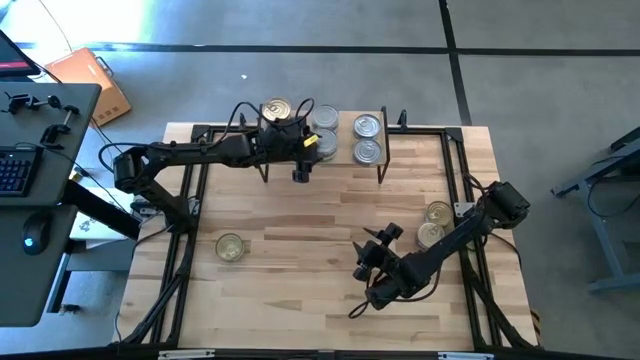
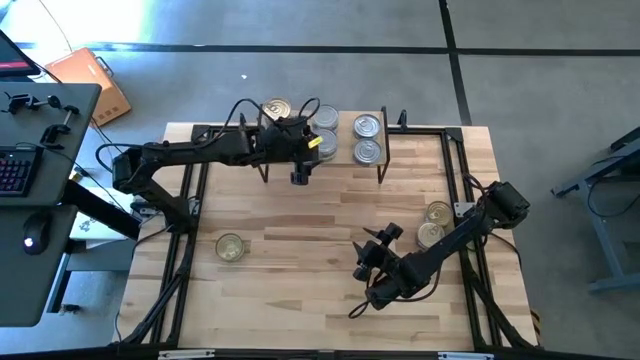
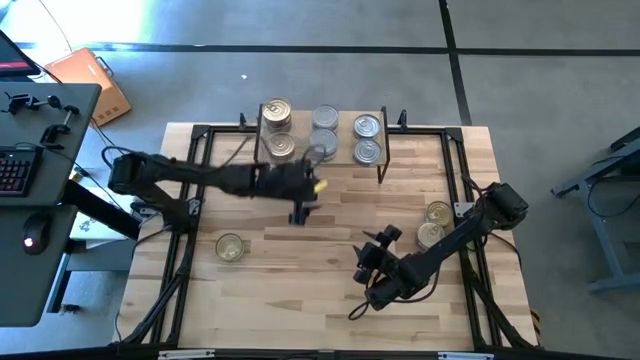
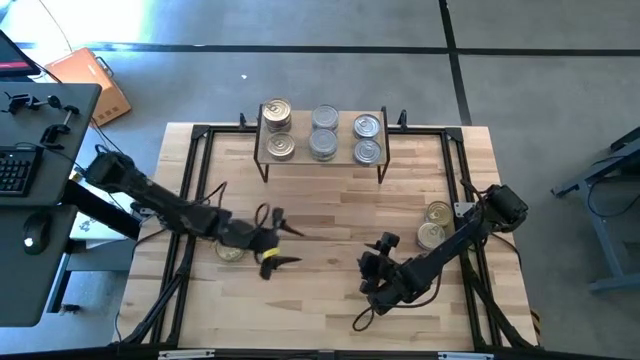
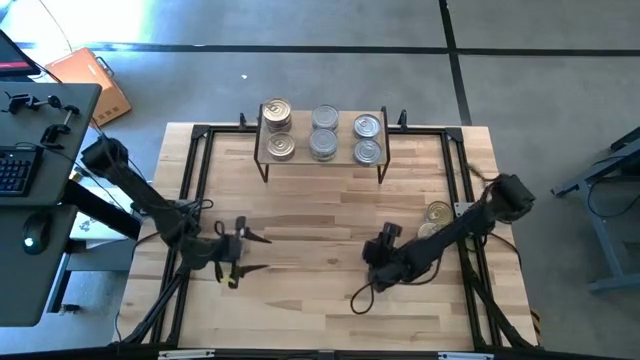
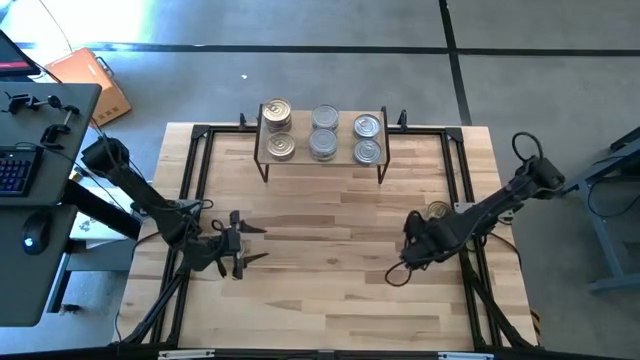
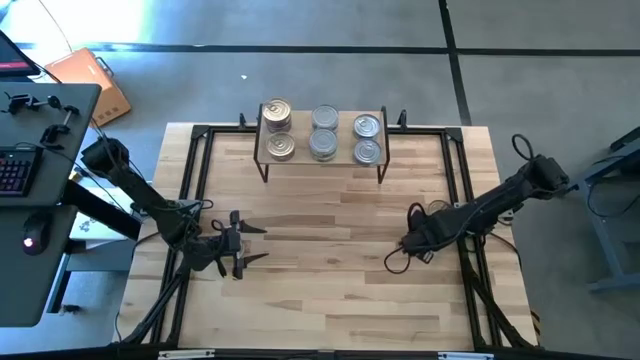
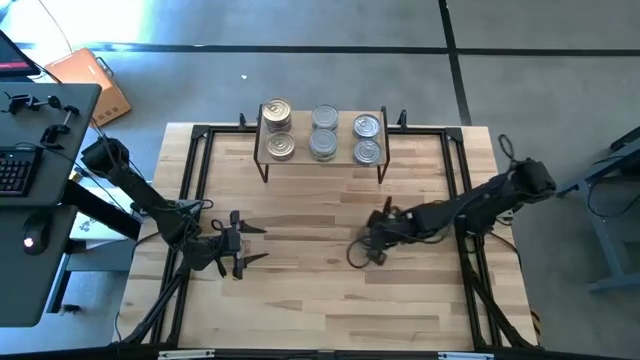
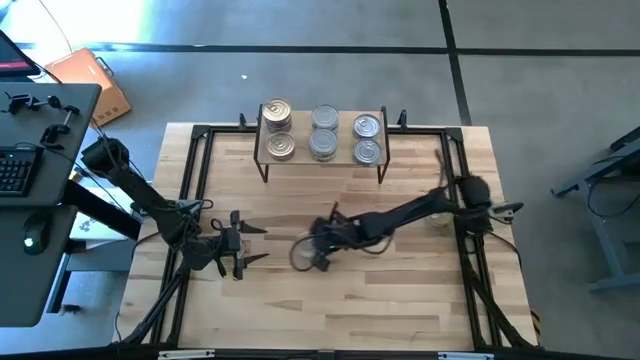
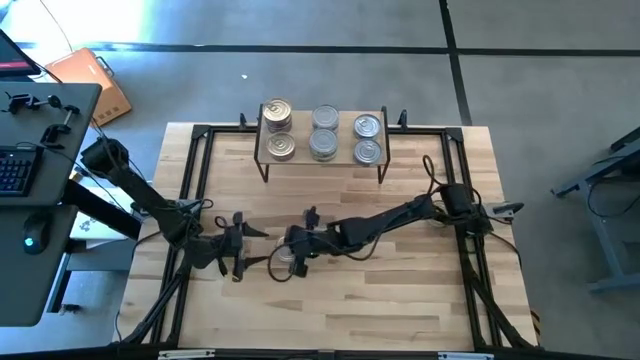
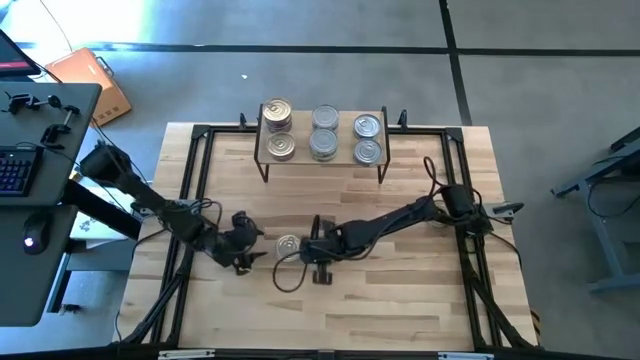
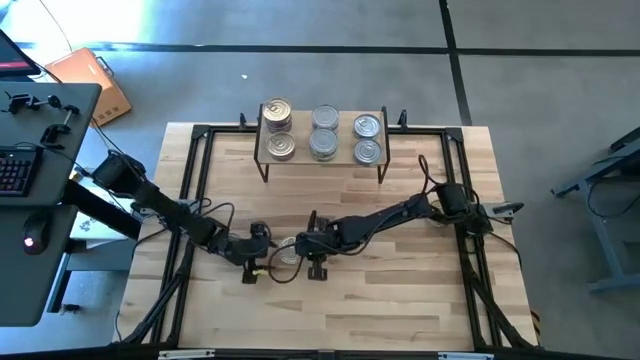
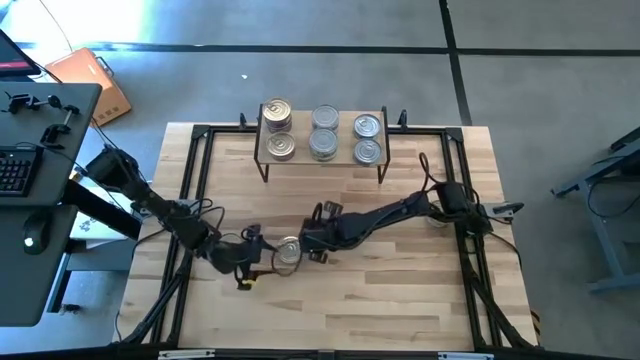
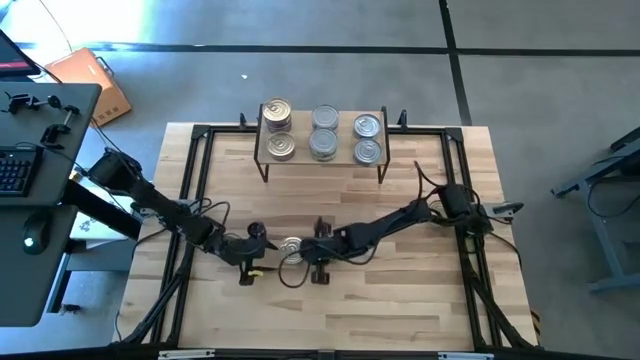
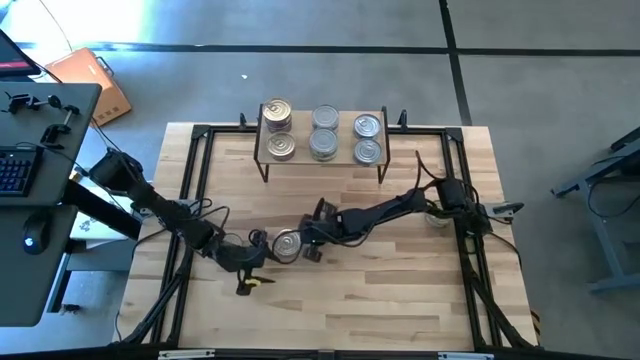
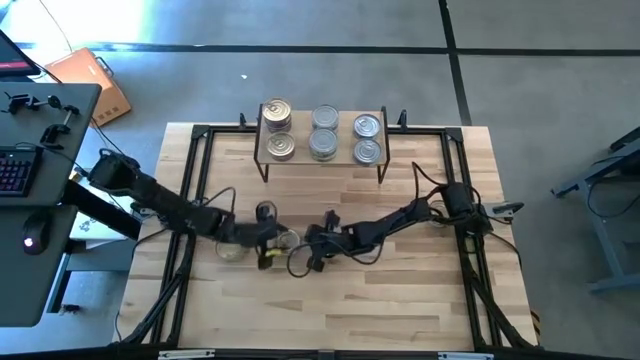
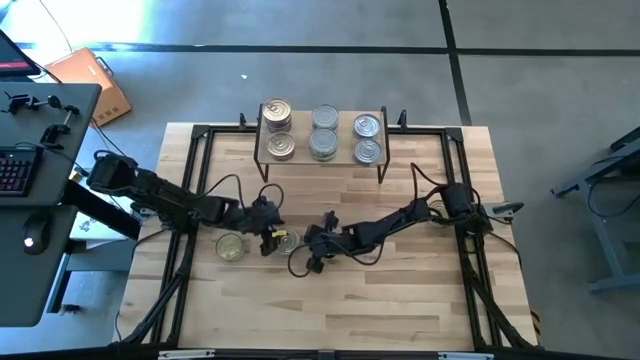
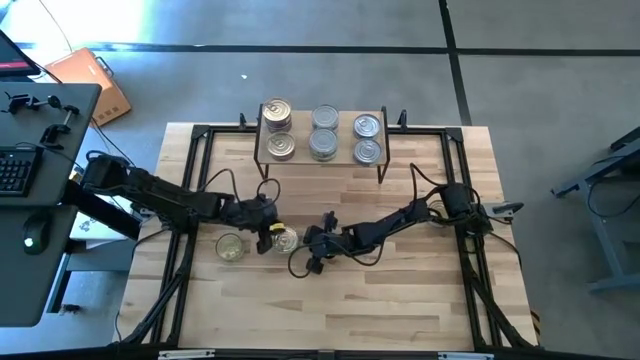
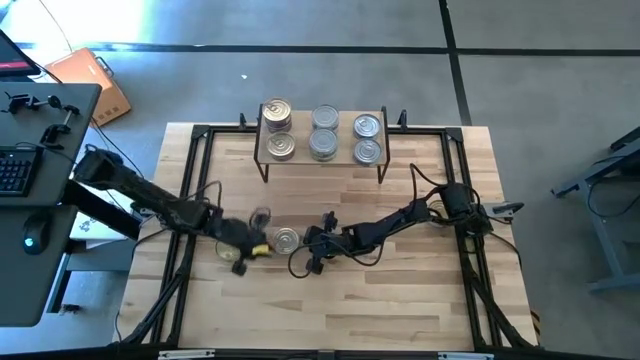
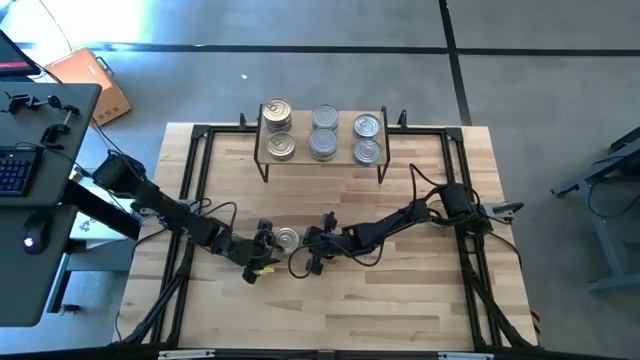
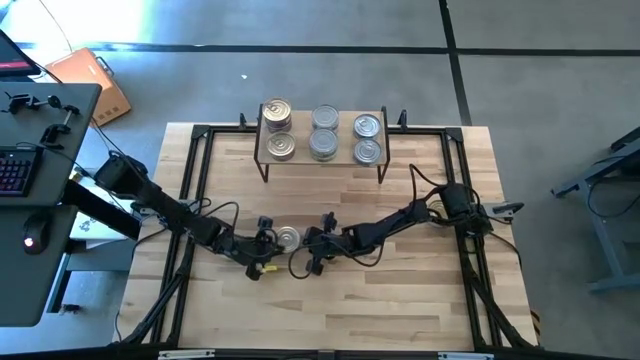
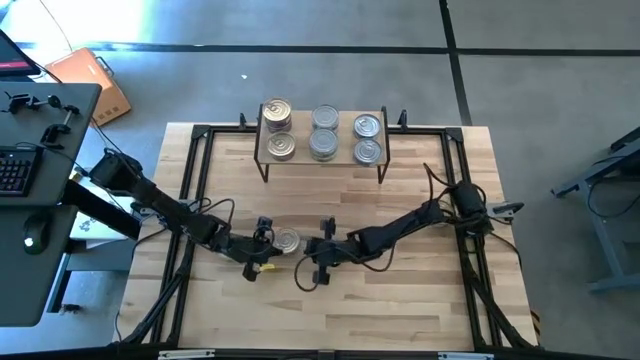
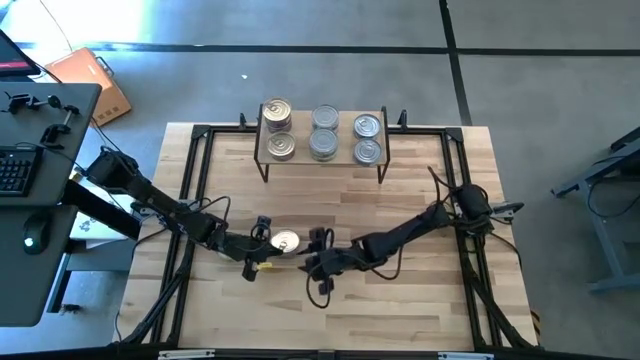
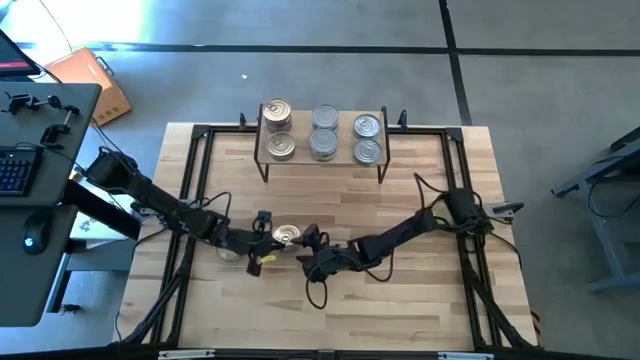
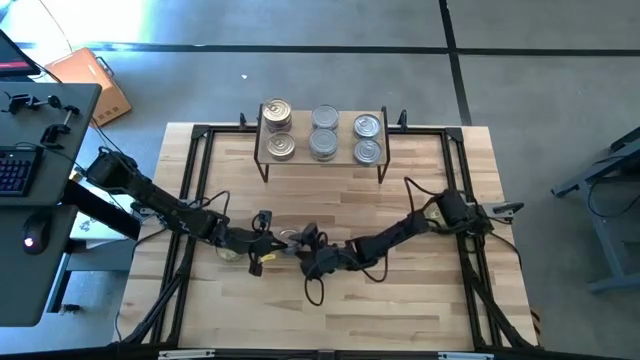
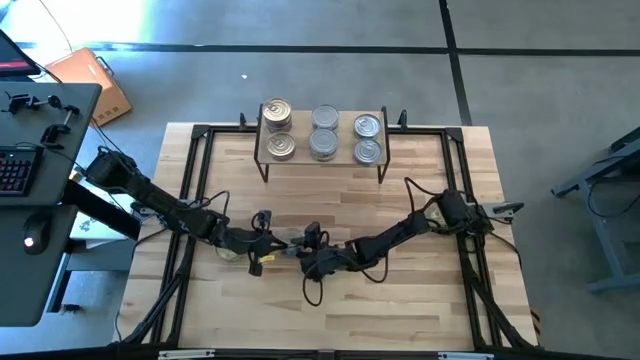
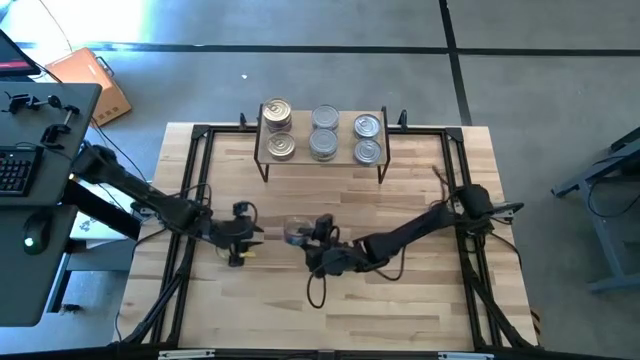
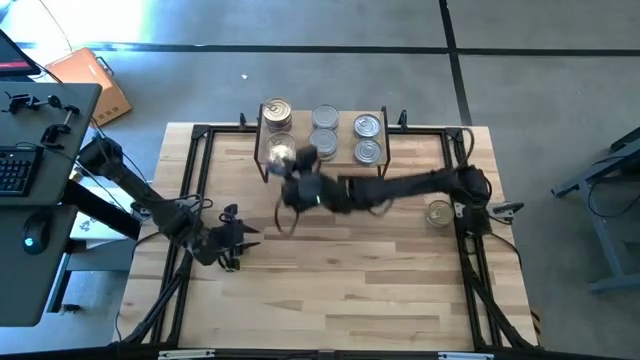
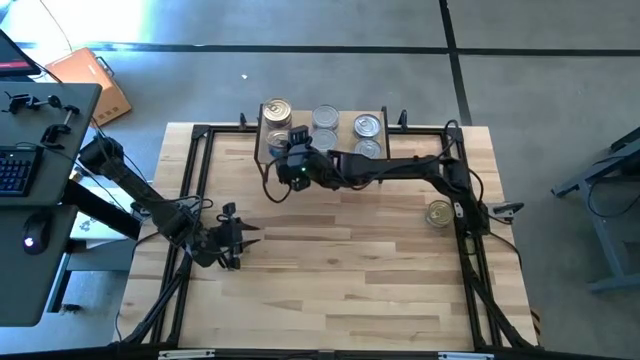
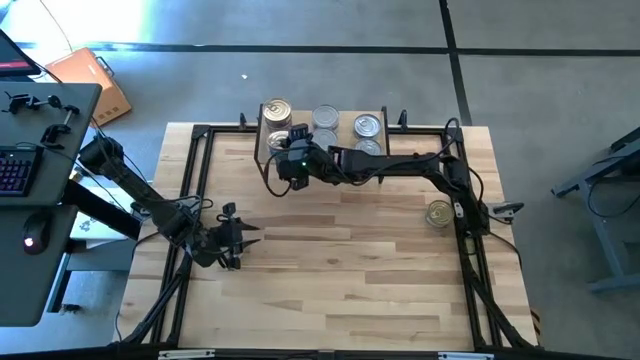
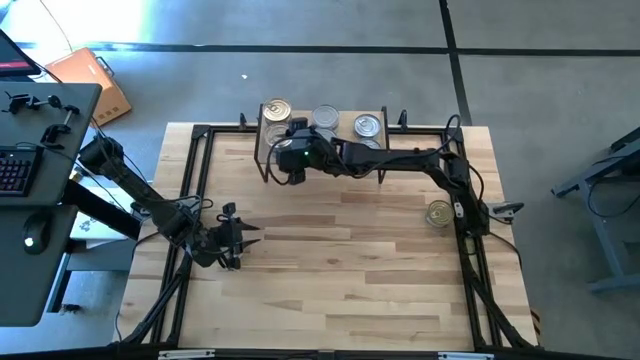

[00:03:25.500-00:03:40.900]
Task: Stack canned seafood by type on shelf
Stack the blue and pink tuna can on top of the blue and pink tuna can on the shelf

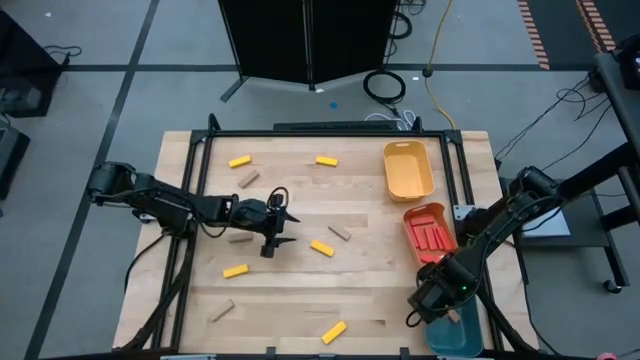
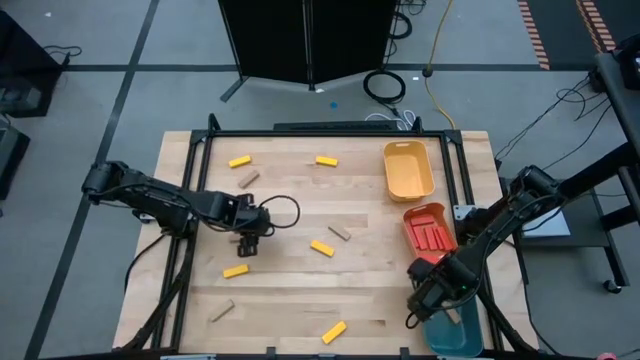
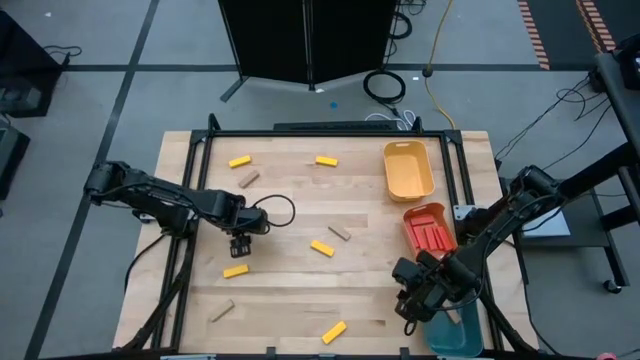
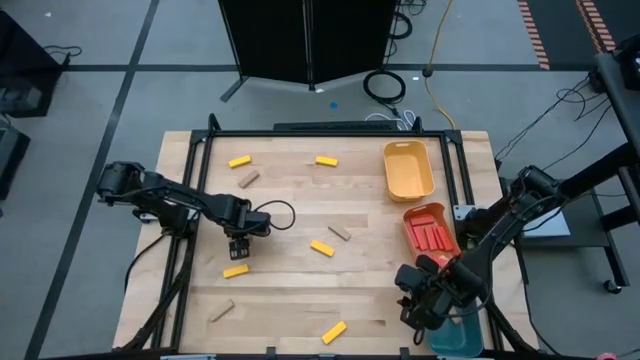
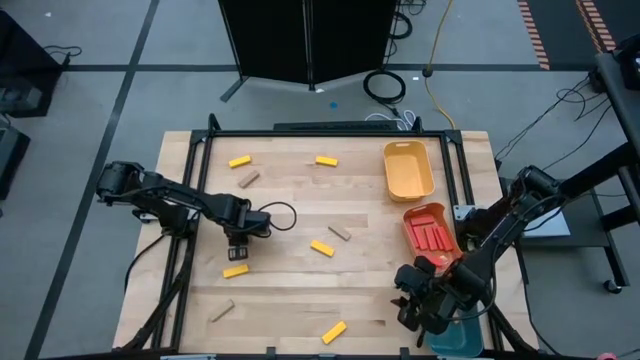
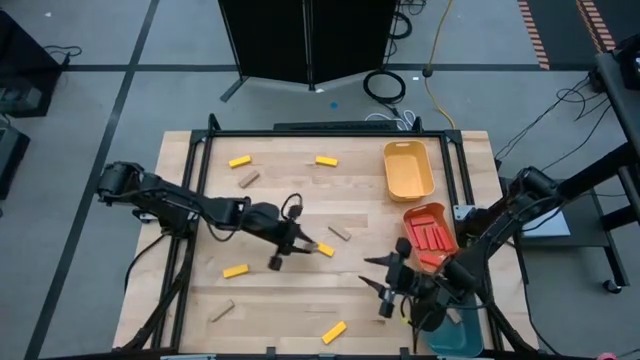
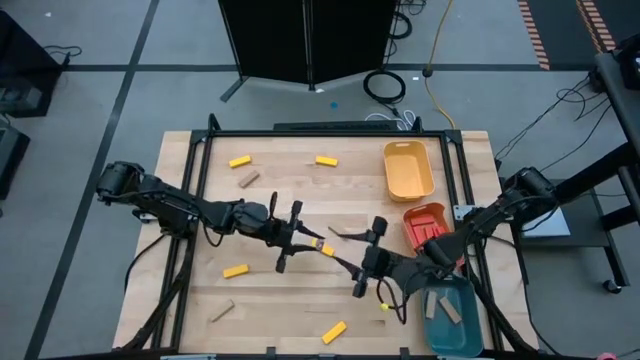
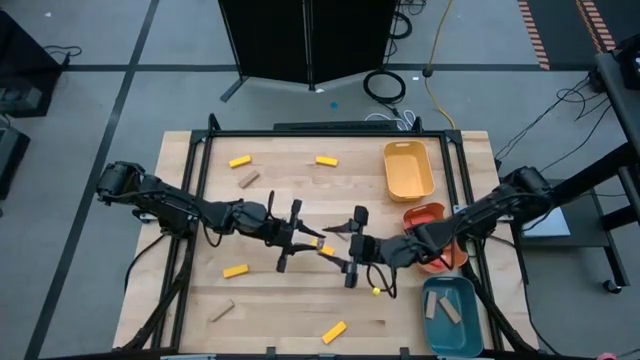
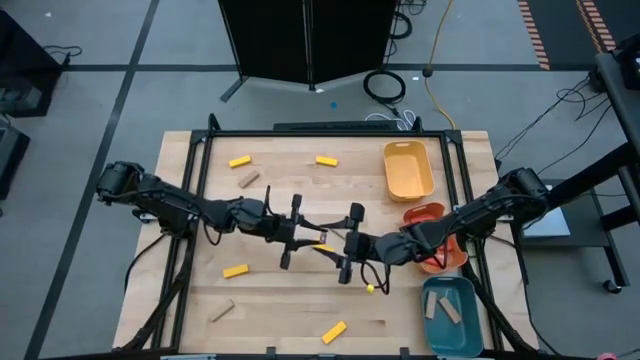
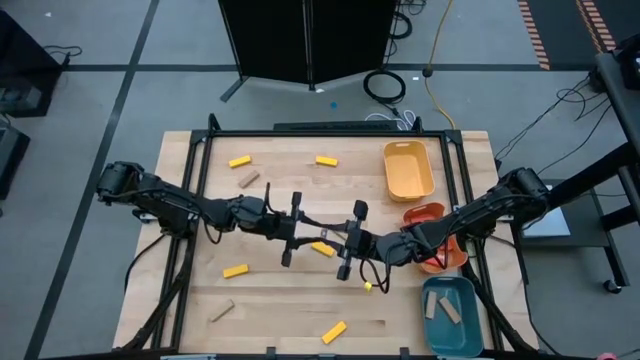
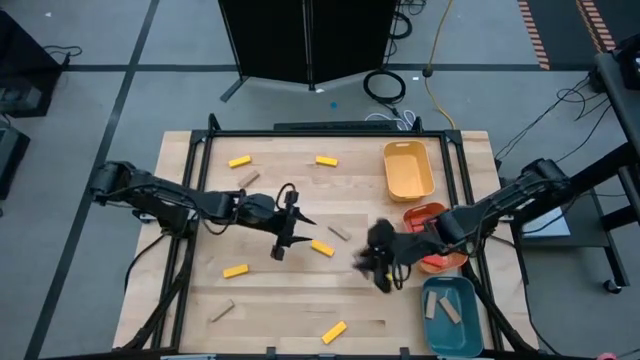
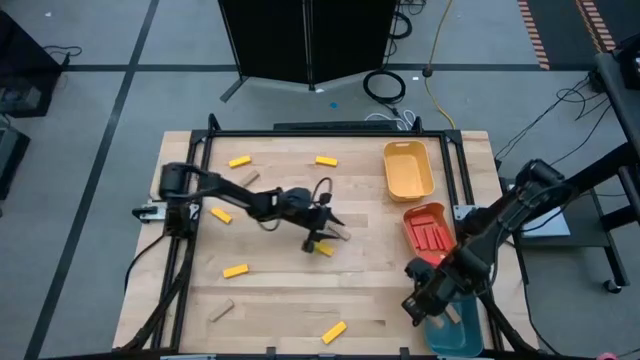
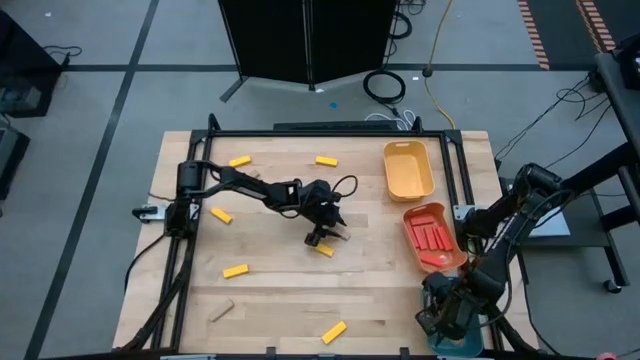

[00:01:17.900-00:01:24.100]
Task: Sort blocks
Put the brown block into the blue bin
